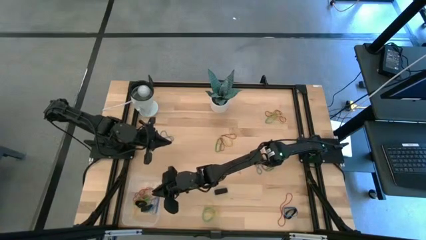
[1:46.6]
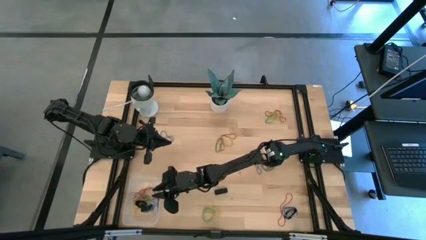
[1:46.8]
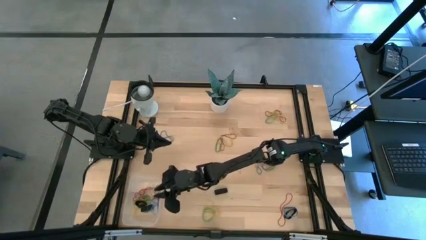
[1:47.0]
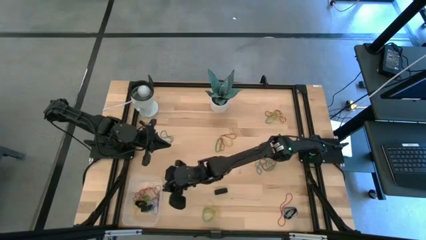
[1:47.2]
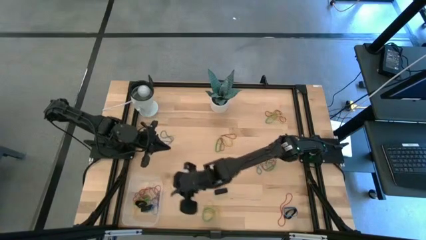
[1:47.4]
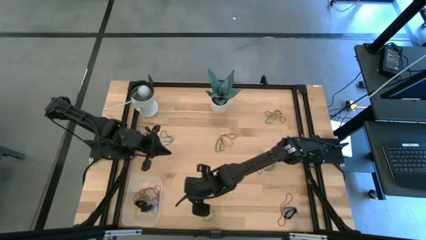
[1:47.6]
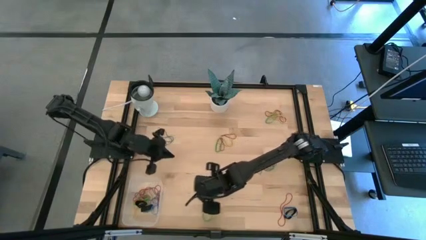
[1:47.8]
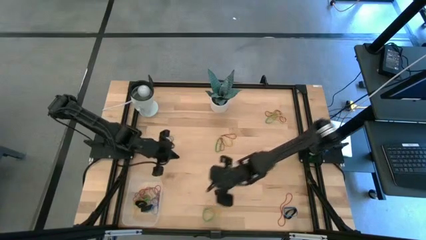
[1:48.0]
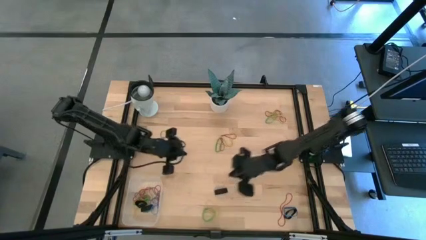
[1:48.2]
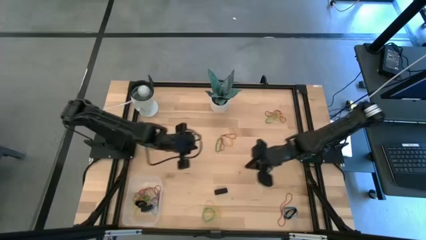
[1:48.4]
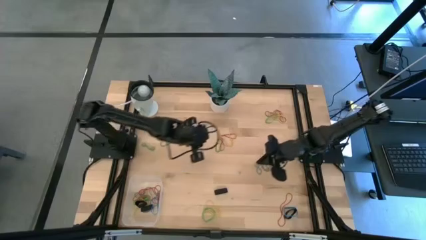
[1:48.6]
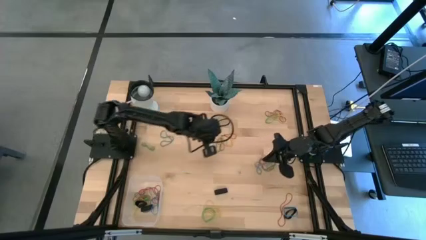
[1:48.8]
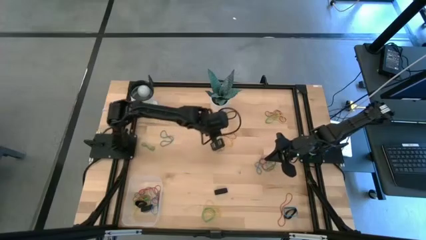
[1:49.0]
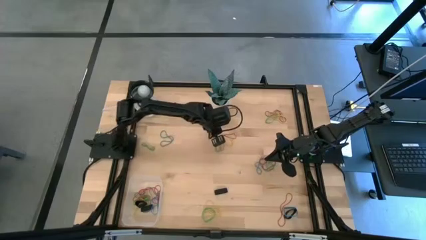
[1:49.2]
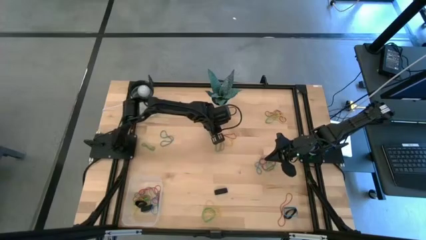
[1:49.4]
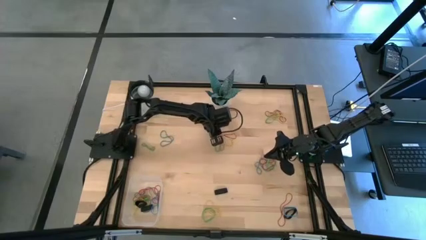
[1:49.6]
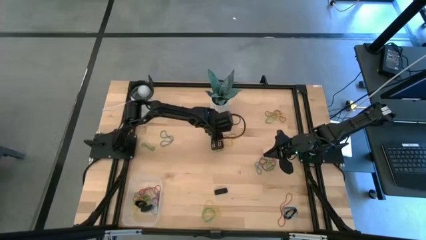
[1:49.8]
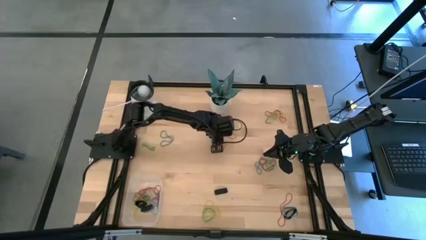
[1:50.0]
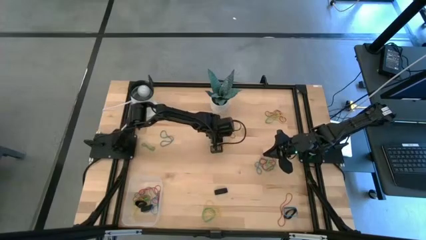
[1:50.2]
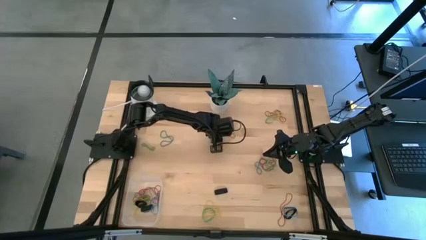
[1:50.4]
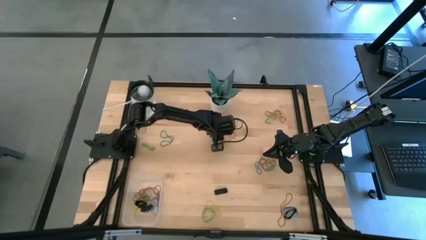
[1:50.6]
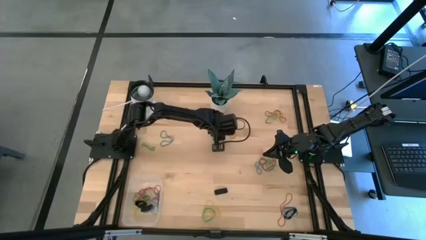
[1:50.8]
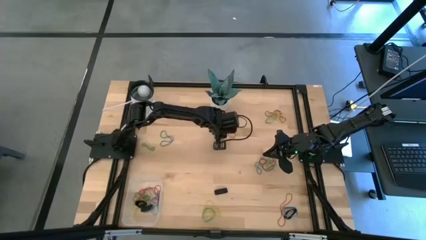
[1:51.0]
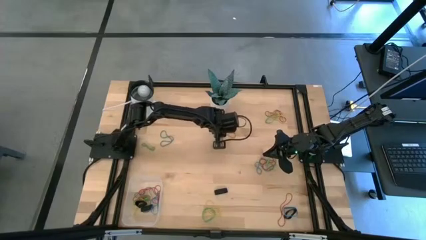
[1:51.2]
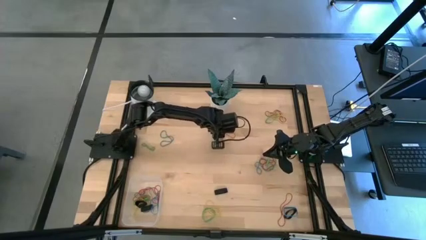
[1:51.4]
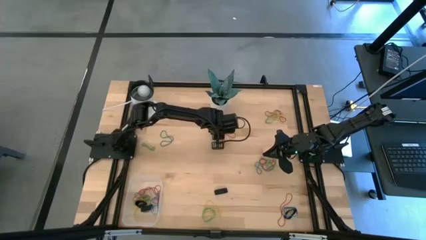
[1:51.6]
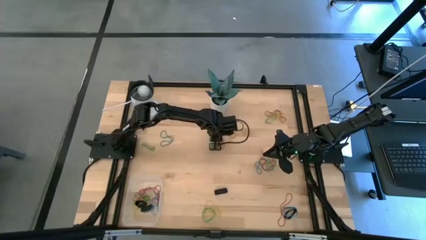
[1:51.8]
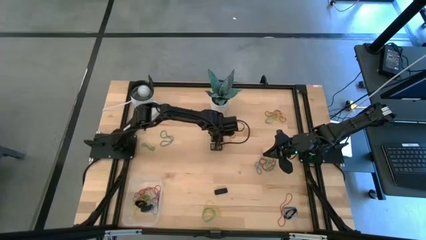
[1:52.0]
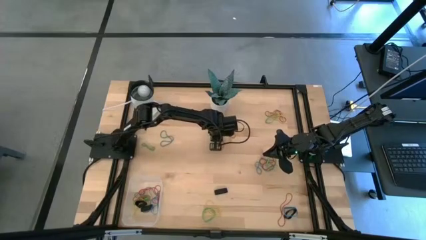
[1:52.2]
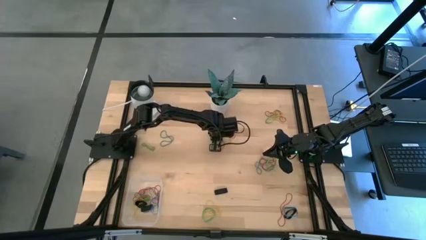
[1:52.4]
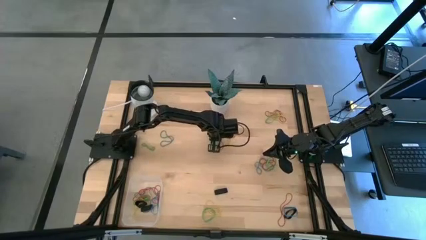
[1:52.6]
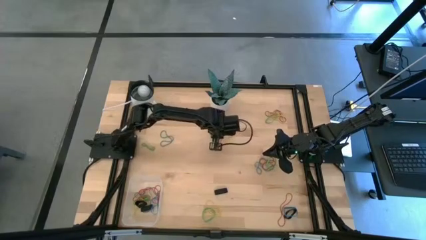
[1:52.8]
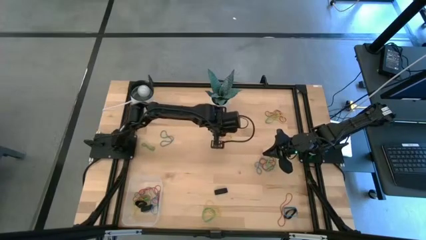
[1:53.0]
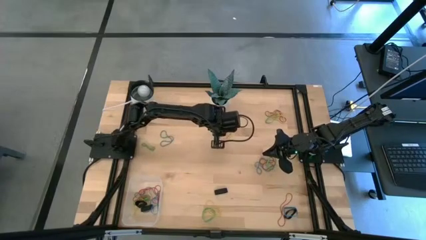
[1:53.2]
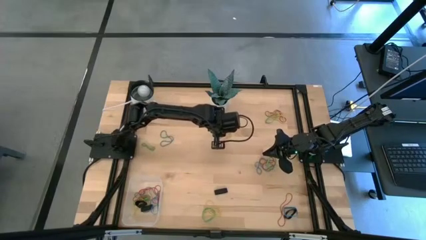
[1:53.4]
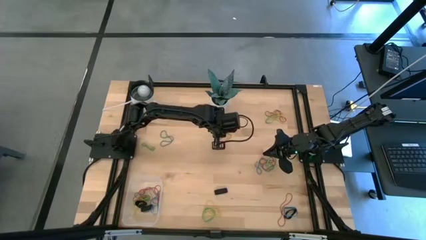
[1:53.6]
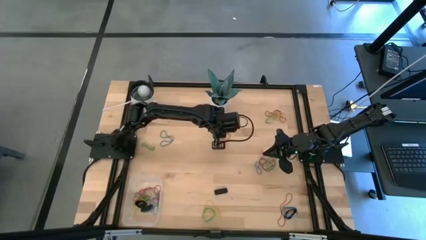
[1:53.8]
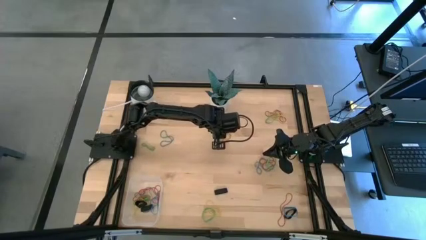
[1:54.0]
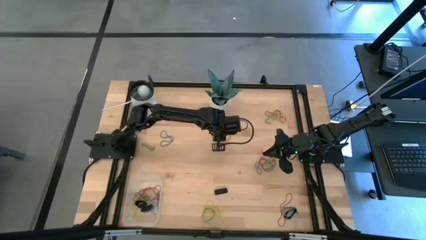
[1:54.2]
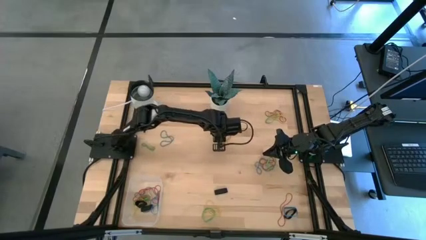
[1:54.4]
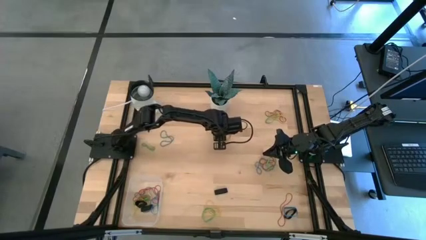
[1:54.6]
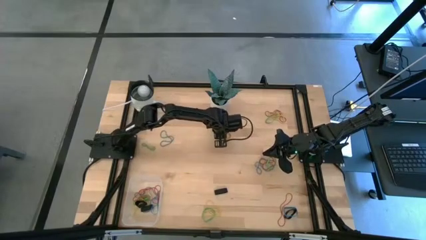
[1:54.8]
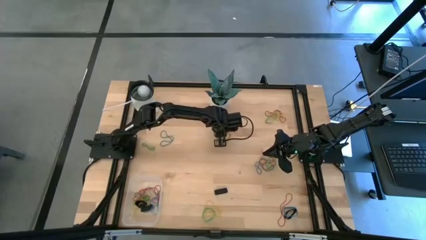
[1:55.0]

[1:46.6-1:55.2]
Task: Pick and place rubber bands into bin
Put the yellow rubber band into the transparent bin

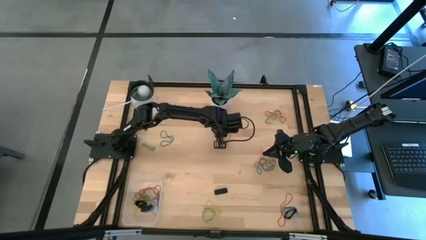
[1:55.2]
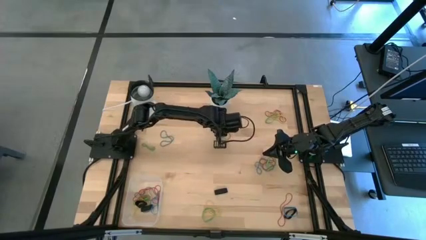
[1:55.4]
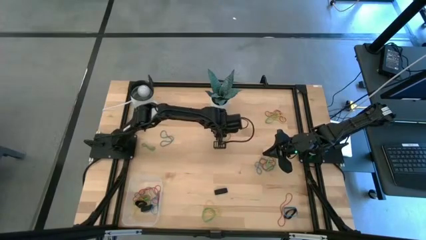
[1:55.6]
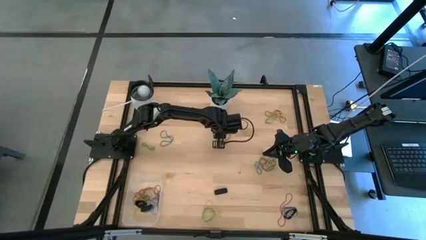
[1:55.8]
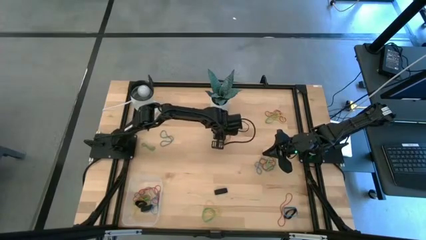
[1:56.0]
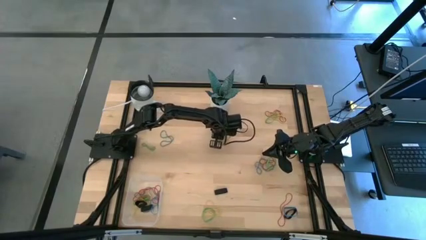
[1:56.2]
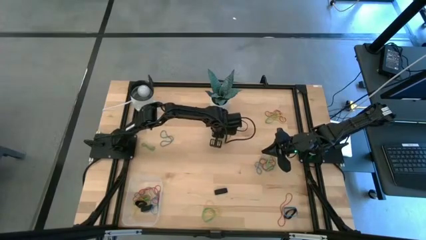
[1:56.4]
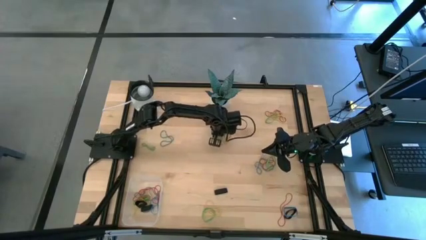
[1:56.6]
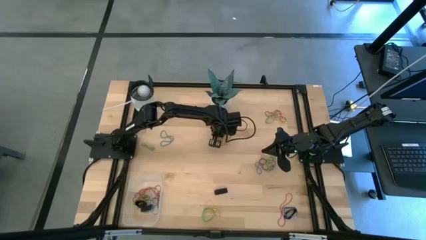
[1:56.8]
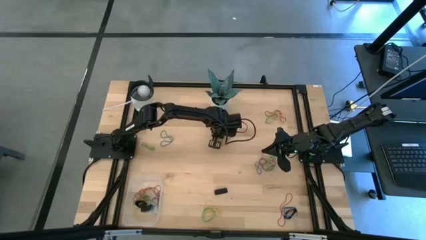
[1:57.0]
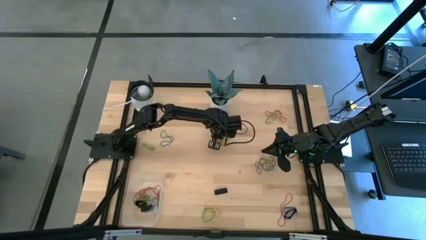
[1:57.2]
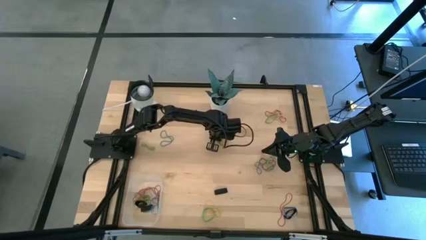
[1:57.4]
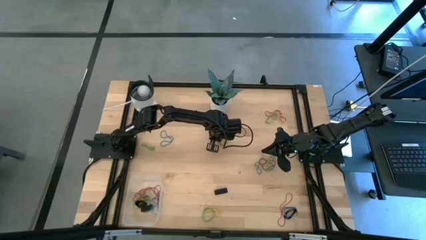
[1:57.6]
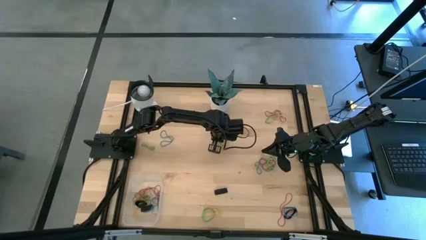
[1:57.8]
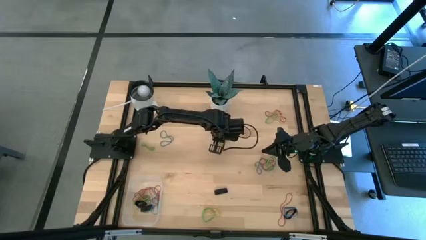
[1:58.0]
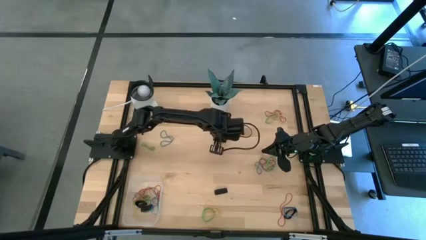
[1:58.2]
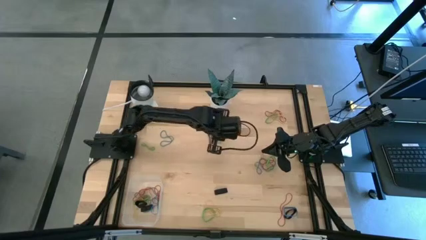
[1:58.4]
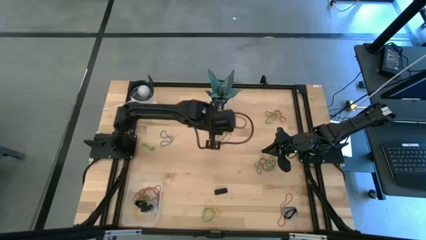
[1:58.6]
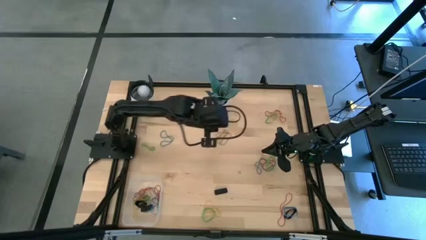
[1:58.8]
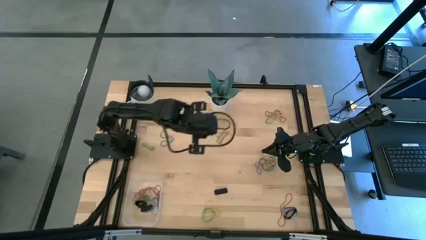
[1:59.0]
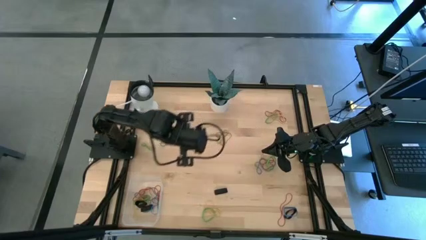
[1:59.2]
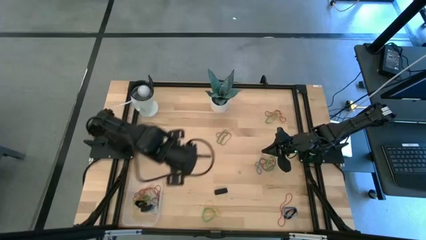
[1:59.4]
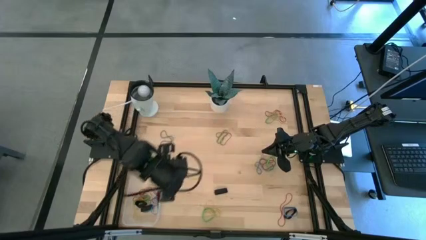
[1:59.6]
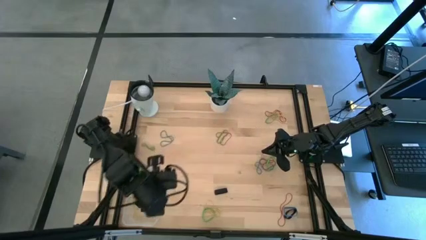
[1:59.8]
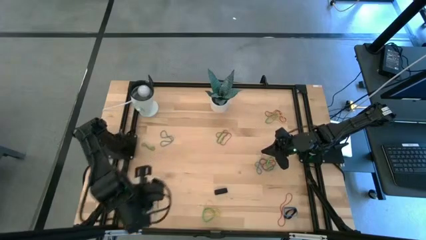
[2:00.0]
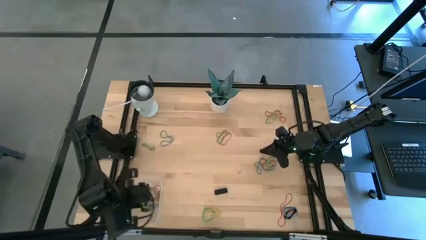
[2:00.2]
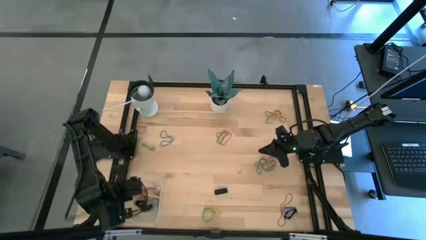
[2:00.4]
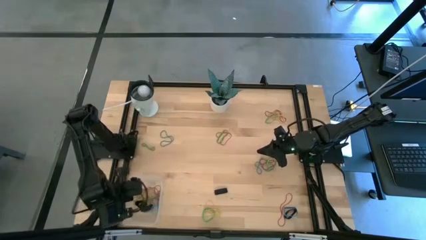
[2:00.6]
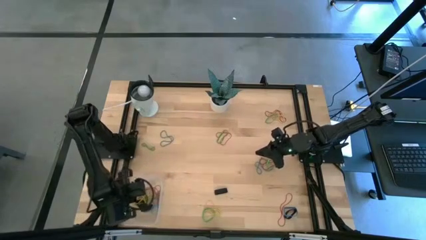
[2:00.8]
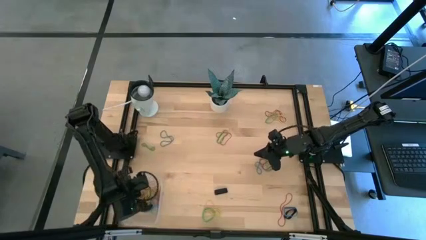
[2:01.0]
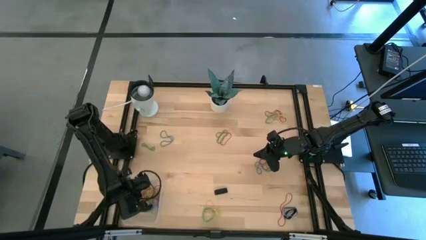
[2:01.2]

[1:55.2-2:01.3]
Put the yellow rubber band into the transparent bin

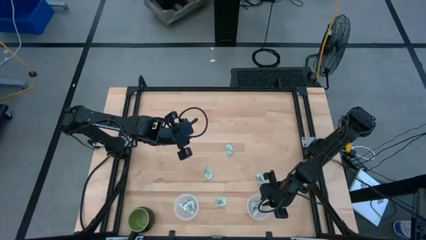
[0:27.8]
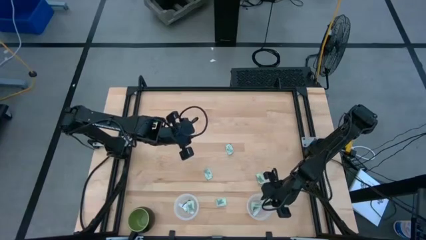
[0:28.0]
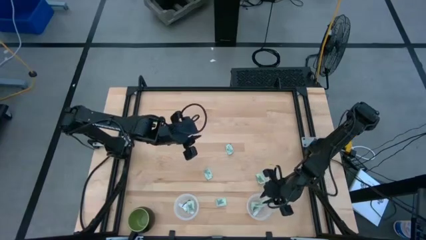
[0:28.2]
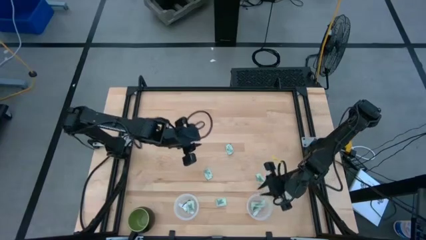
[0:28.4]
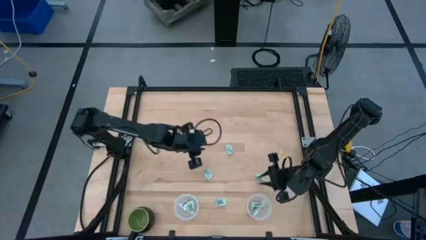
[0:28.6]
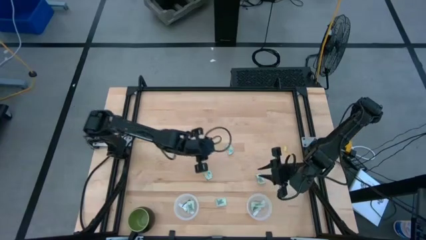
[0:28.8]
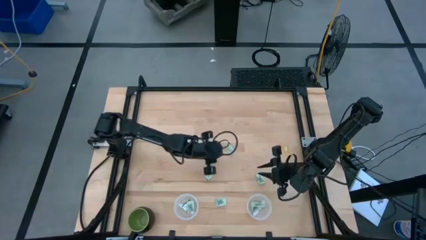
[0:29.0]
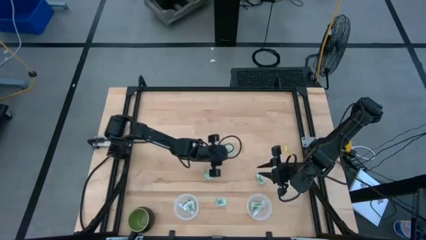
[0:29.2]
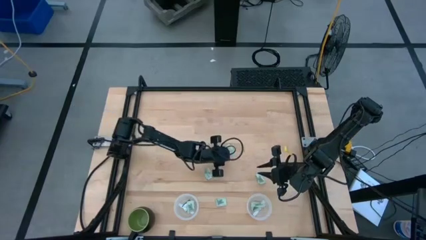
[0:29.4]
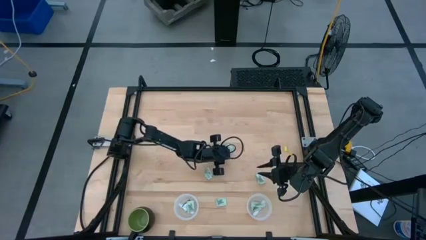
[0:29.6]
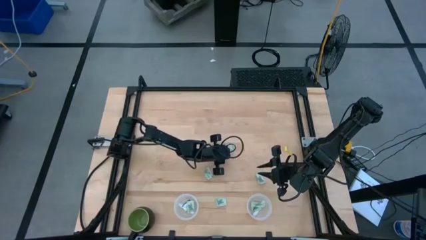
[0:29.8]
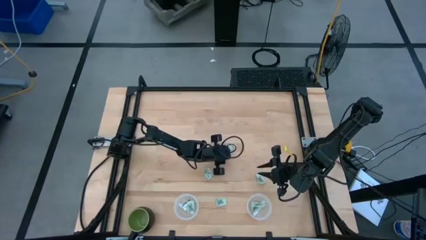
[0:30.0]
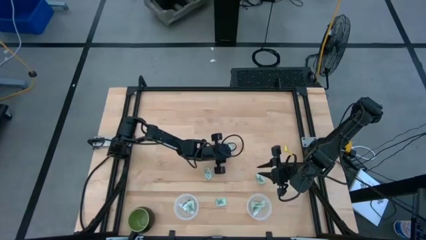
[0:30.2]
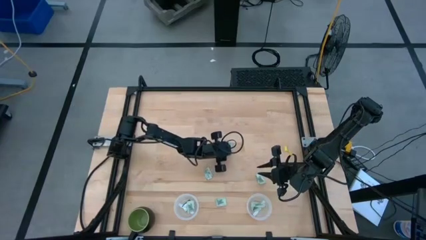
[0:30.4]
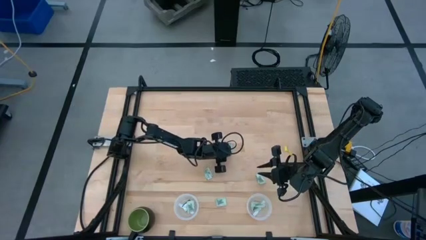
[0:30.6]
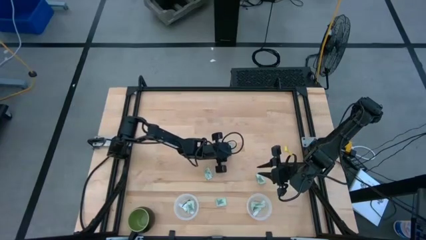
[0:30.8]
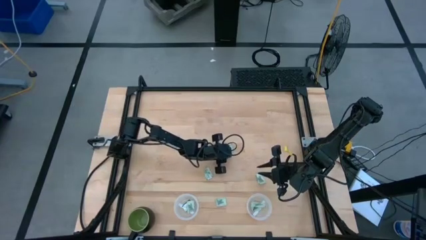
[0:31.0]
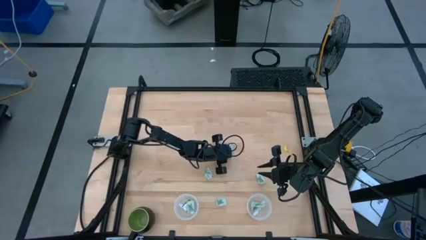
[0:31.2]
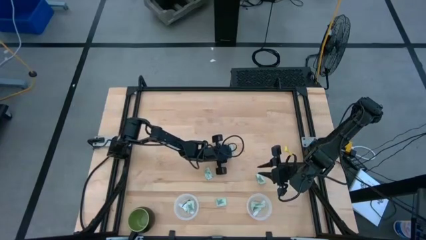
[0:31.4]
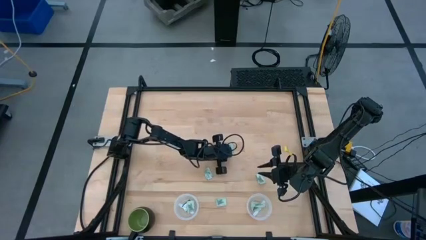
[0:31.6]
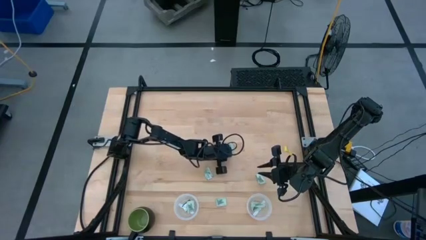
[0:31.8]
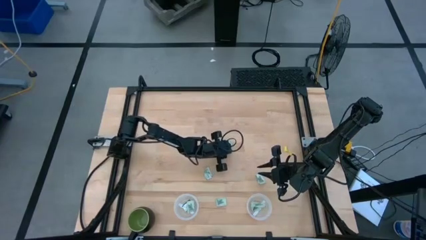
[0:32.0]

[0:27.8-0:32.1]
Task: Pick and place Stevia / Truvia into bins
Put the stevia packet into the left transparent container
